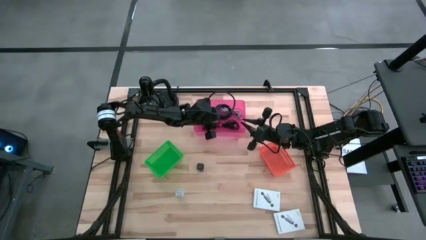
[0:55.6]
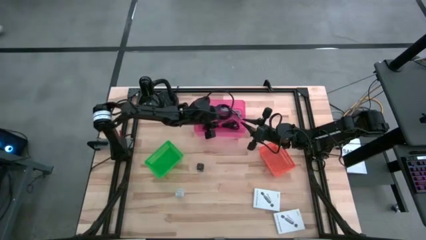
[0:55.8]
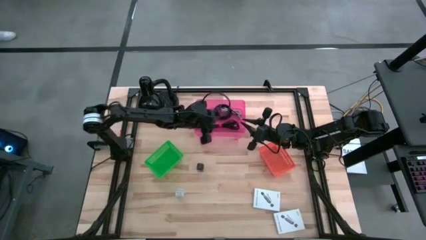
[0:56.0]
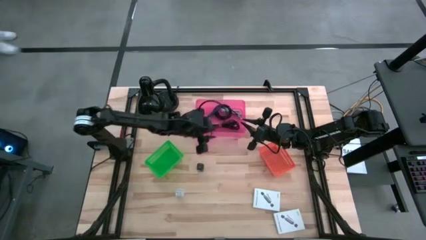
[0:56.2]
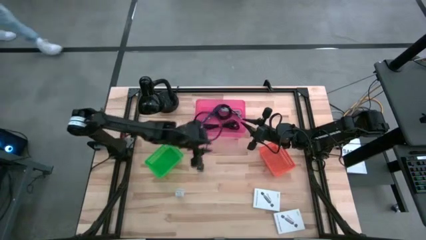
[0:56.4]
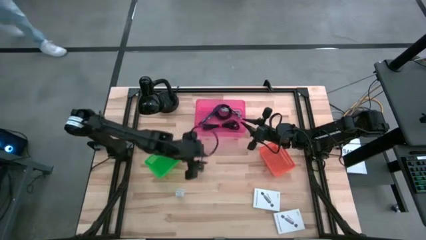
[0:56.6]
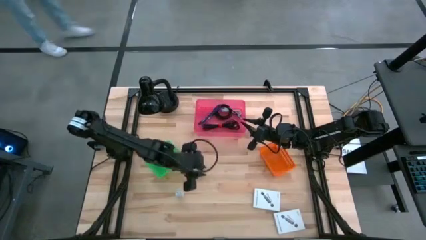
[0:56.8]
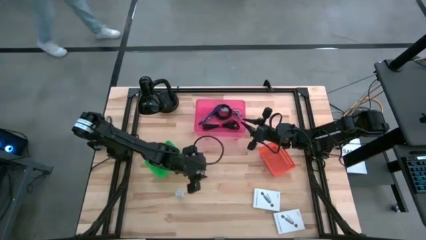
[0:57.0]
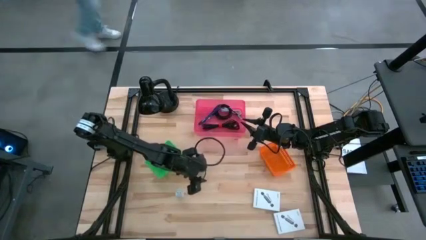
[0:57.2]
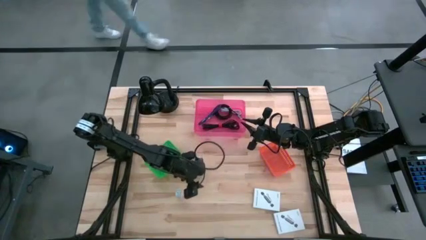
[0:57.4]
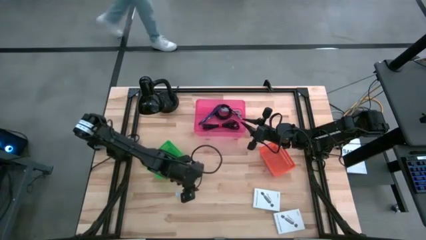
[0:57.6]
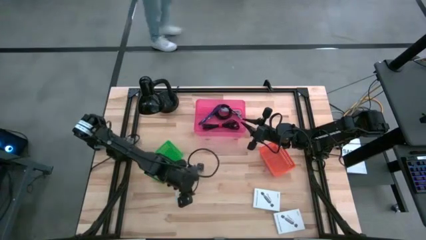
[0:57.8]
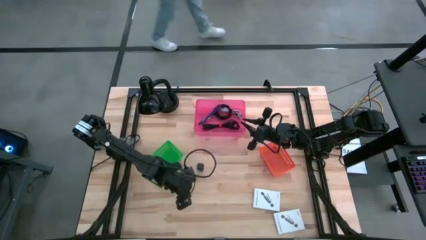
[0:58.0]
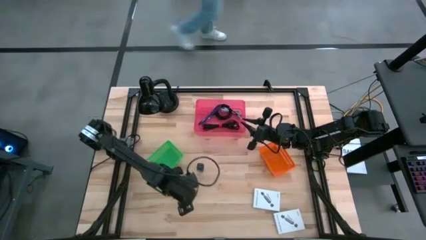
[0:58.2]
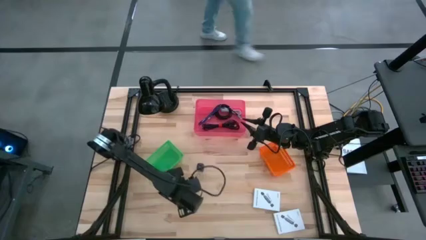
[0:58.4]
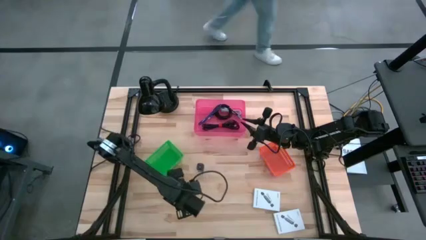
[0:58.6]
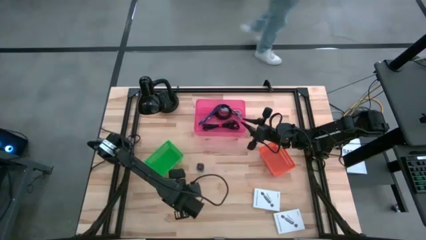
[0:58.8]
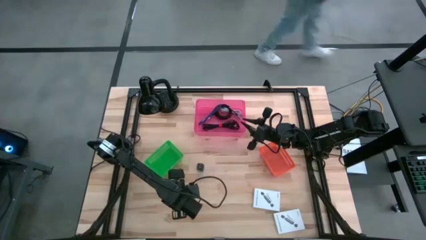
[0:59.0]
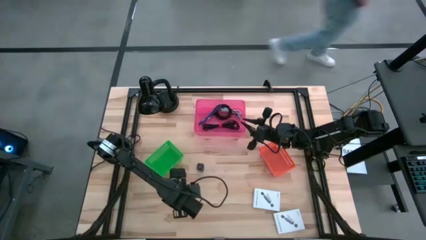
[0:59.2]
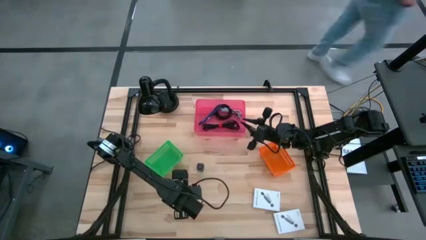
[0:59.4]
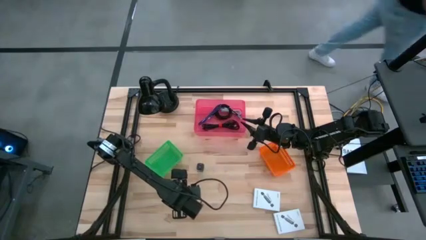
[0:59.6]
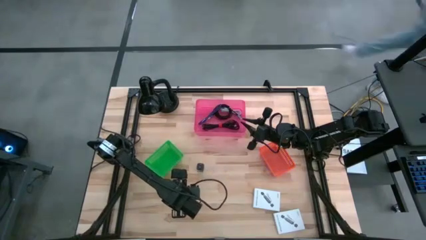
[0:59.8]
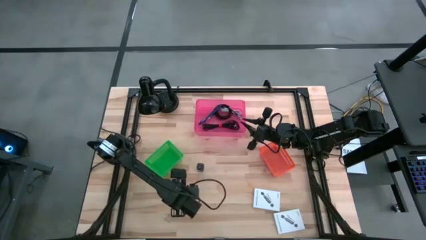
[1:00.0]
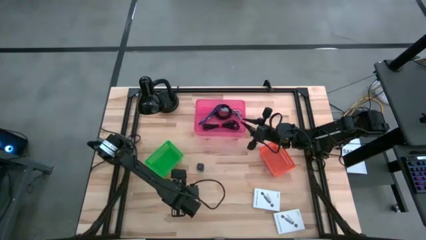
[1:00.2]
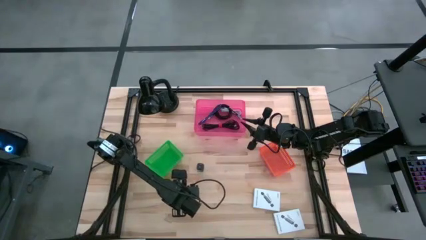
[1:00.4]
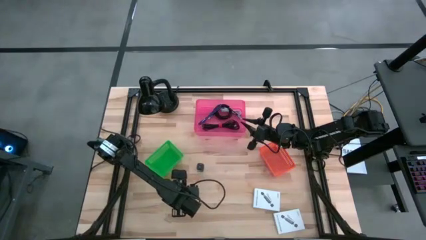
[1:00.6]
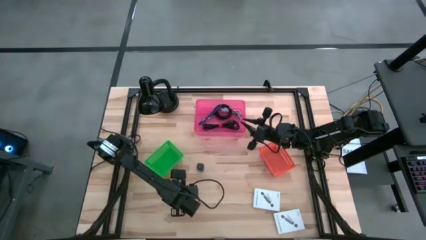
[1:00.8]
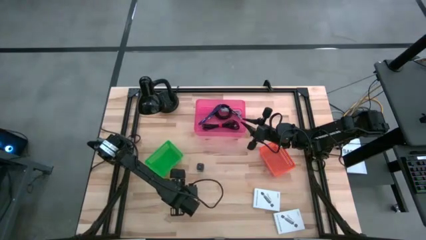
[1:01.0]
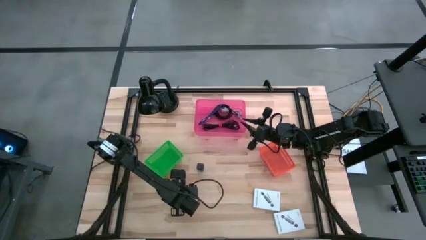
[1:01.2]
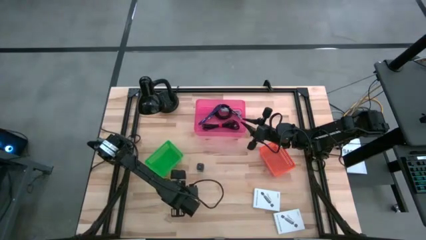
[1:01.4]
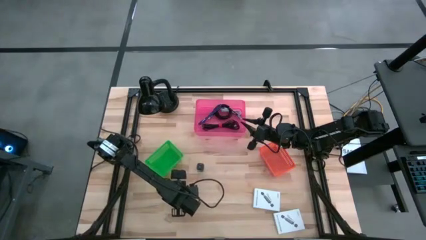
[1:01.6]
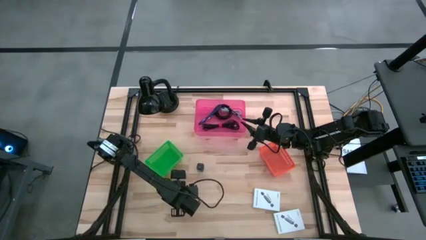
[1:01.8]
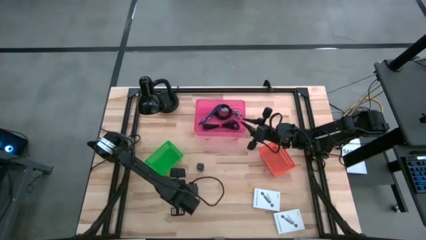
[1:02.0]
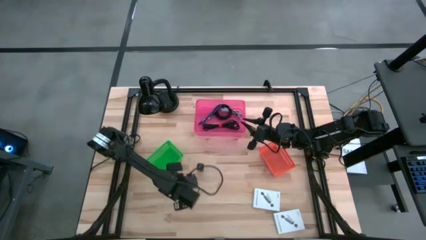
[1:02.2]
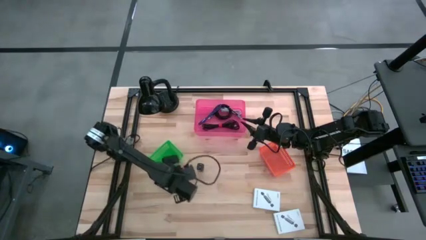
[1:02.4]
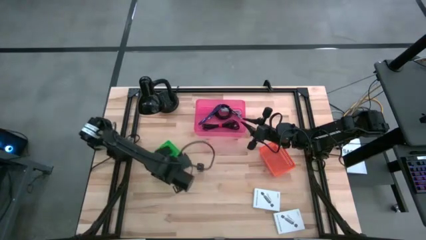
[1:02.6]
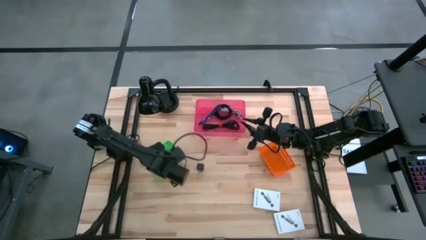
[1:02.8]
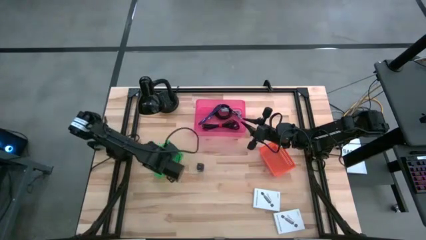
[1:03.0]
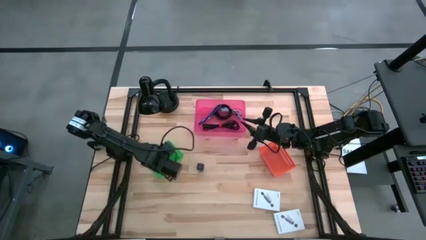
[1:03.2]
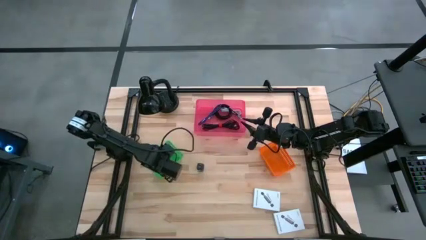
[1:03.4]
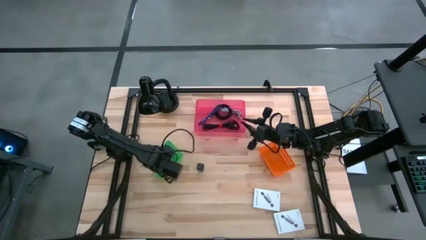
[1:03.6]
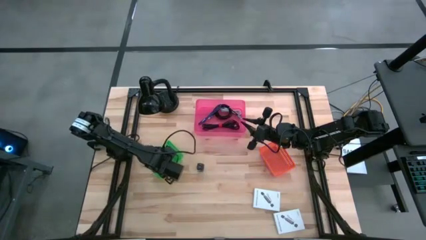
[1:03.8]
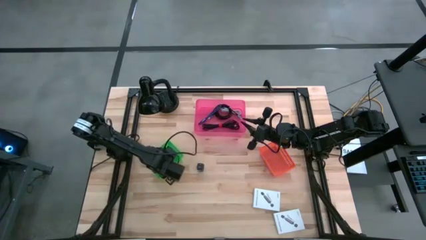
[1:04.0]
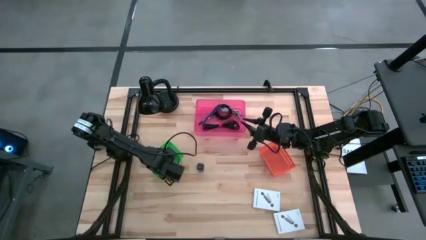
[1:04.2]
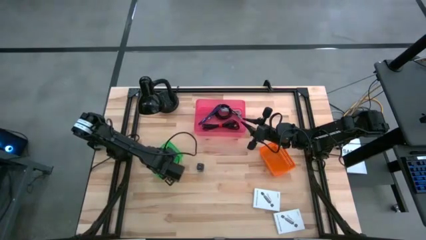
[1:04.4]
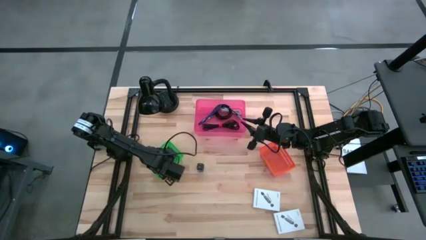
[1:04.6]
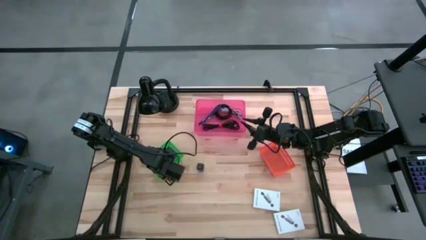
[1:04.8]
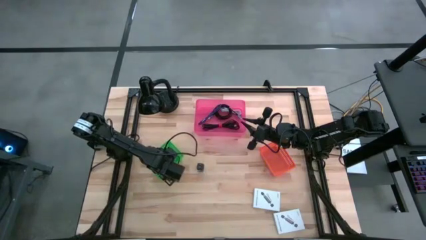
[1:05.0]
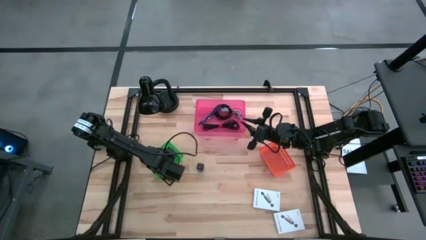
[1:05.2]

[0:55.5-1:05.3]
Task: Pick and place items into bin
Put the white charger adapter into the green bin
